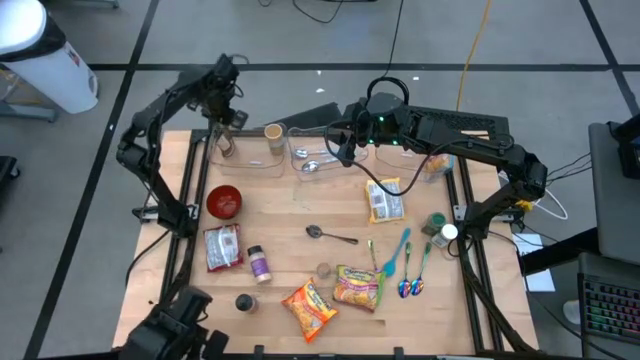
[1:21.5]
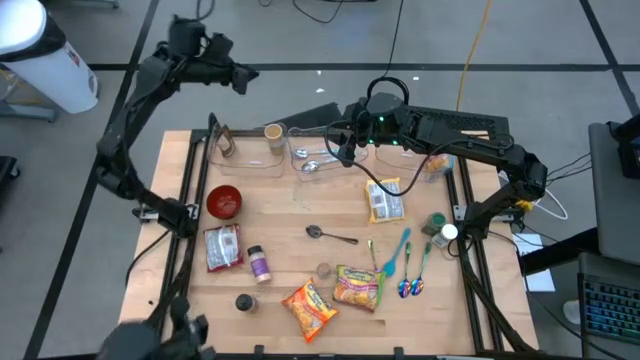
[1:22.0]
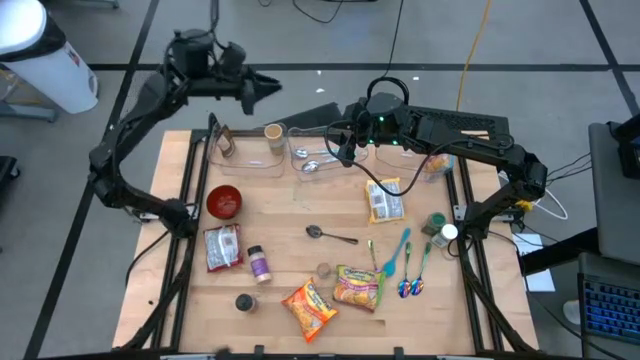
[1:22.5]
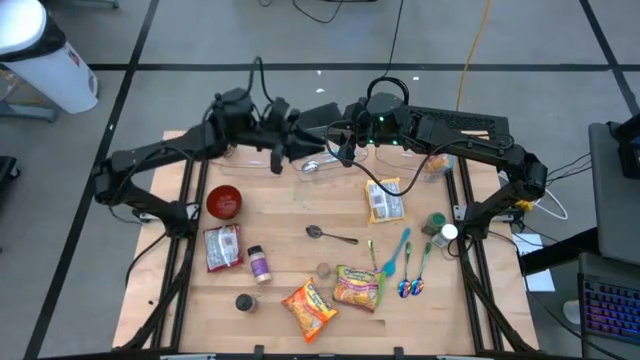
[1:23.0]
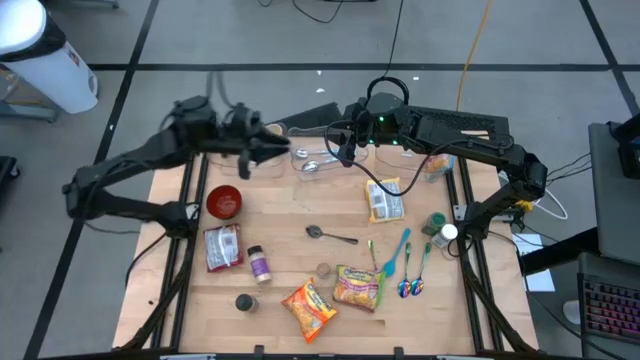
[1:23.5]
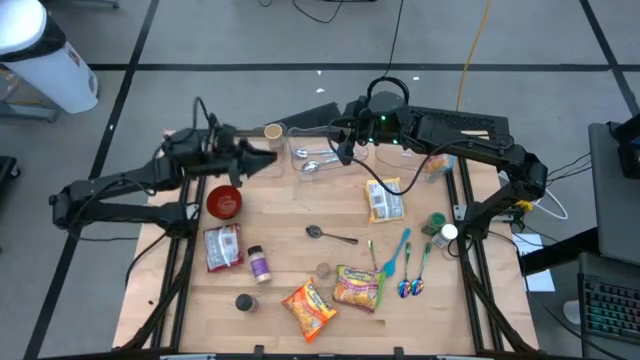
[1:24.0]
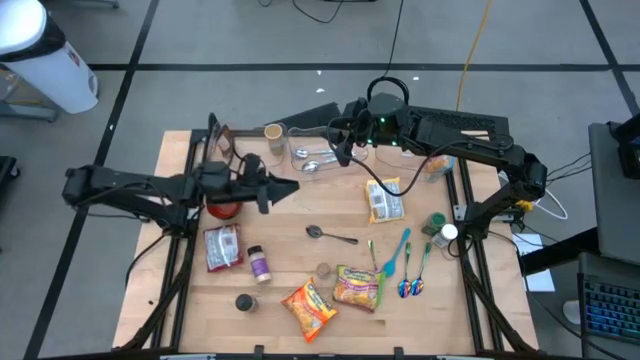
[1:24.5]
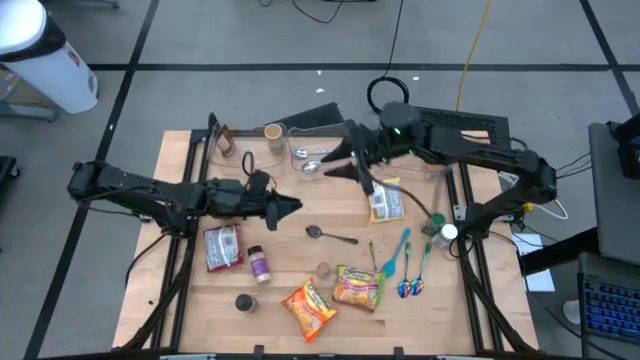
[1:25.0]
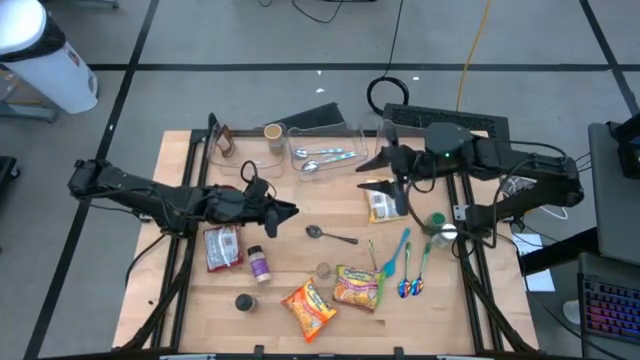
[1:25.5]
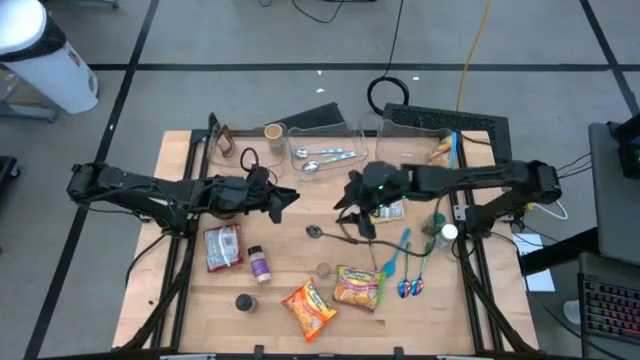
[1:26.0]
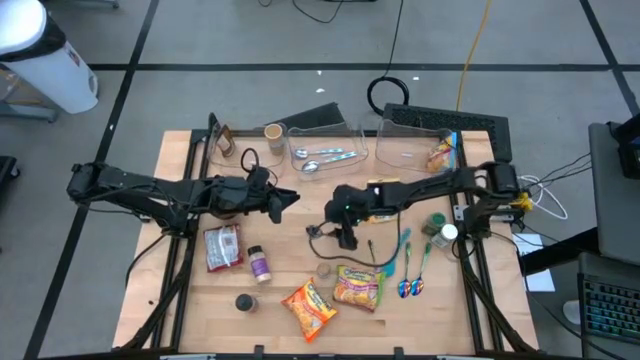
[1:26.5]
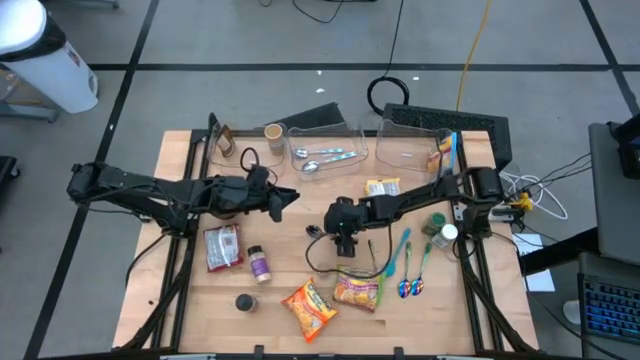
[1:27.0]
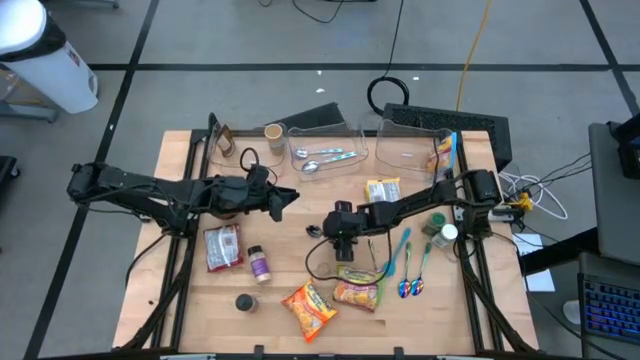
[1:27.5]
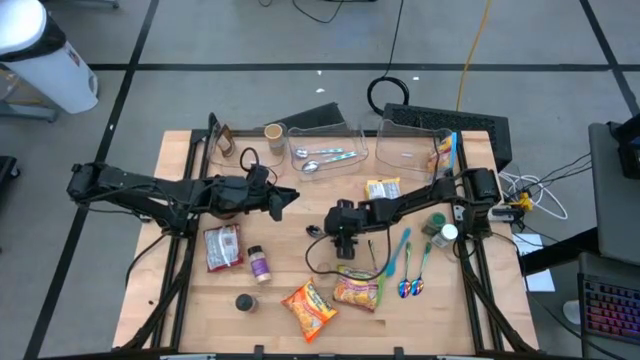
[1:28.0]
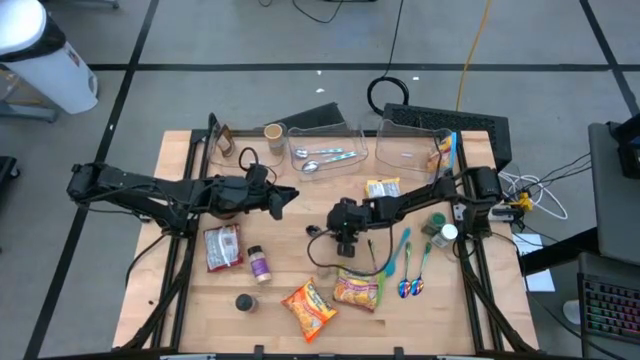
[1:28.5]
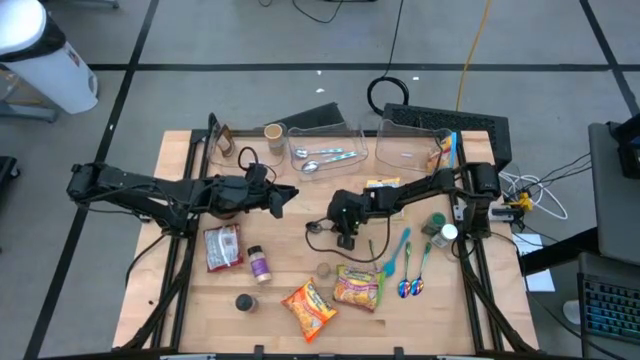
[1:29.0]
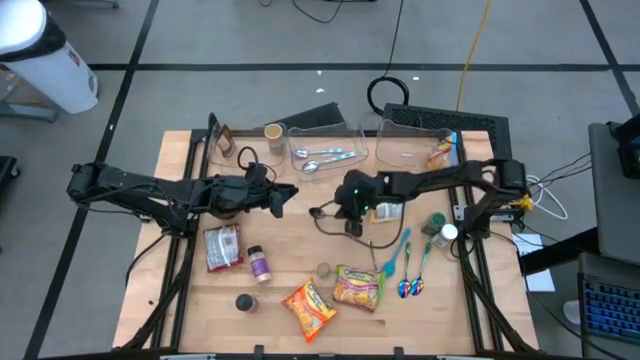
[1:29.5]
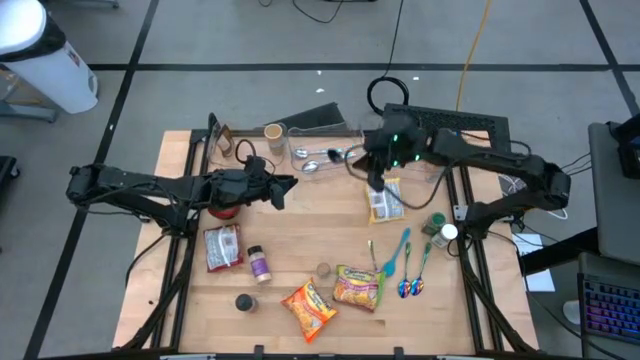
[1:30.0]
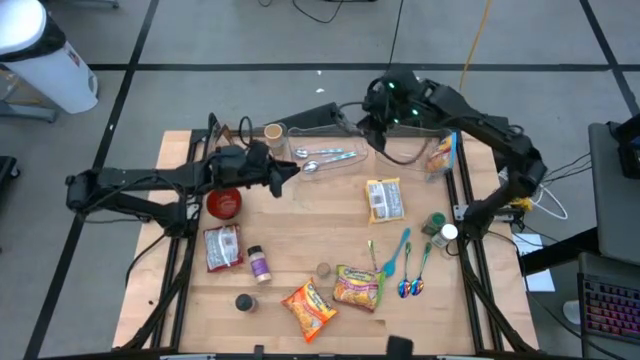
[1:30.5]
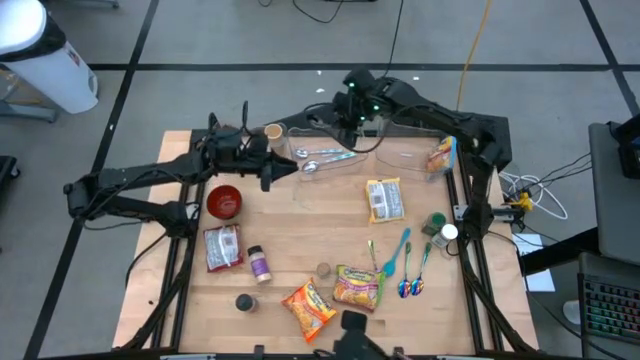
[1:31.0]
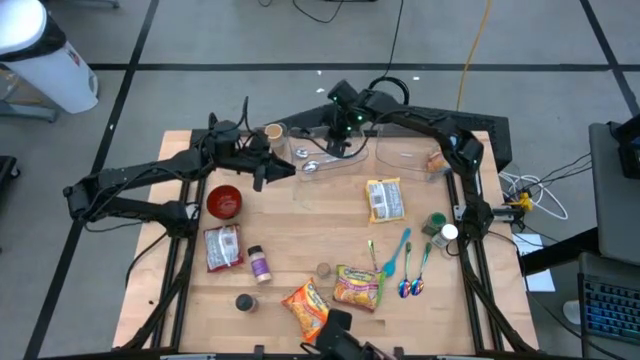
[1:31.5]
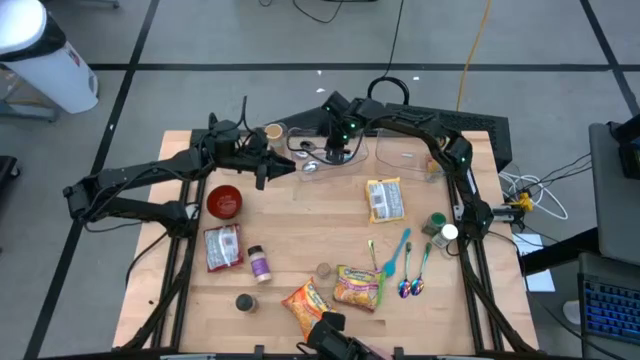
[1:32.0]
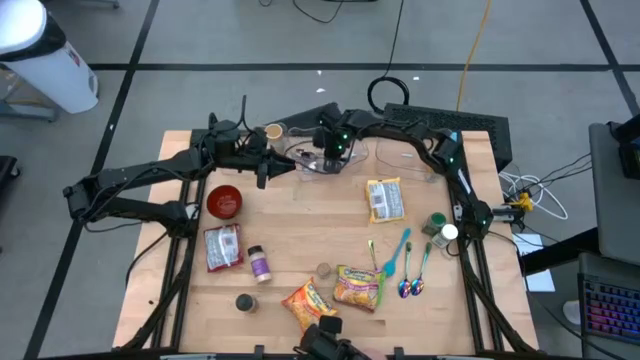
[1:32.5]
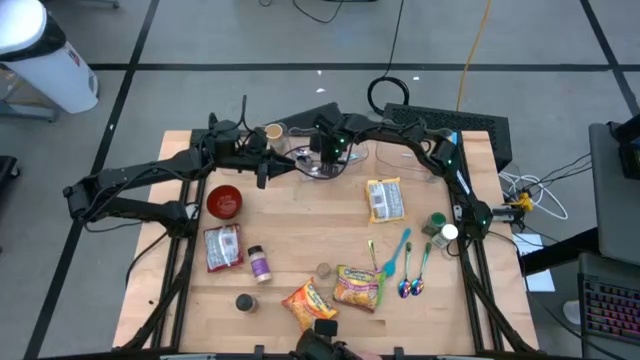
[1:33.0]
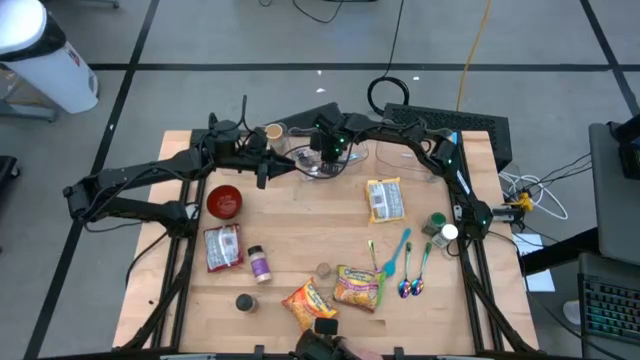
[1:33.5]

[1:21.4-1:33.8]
Task: Pick & Place Food Item
Put the black spoon into the middle transparent bin

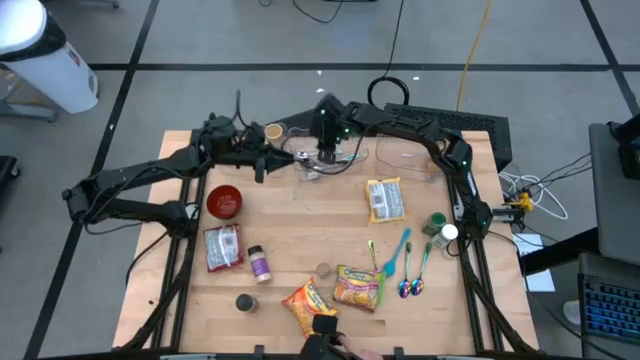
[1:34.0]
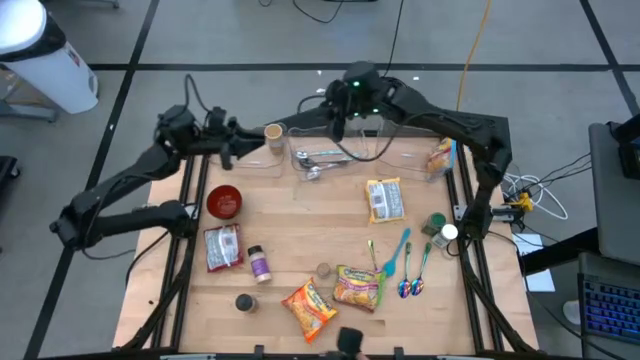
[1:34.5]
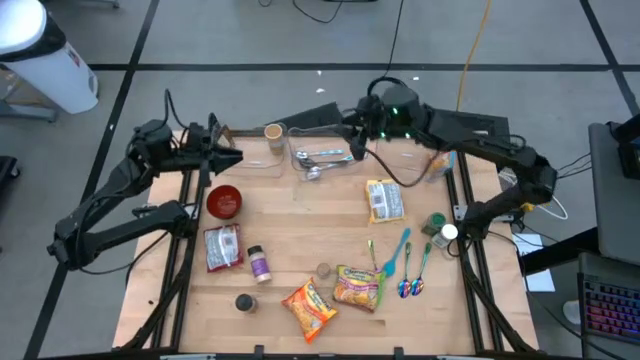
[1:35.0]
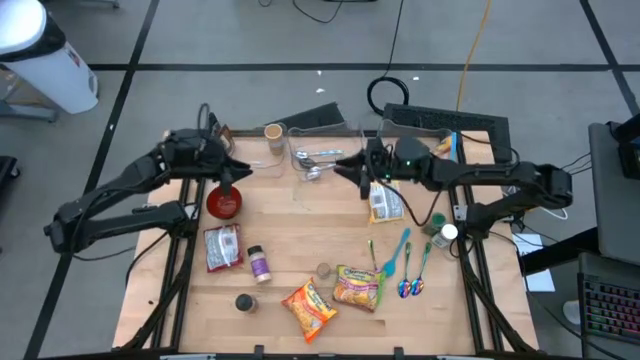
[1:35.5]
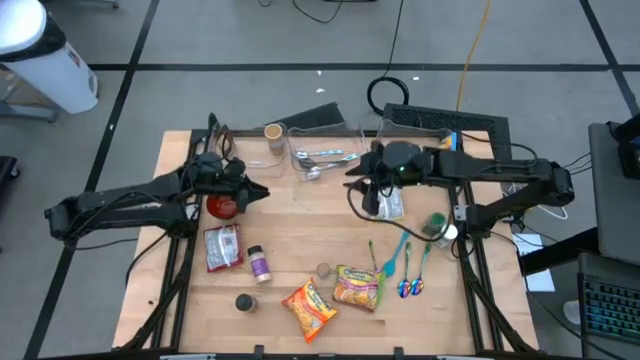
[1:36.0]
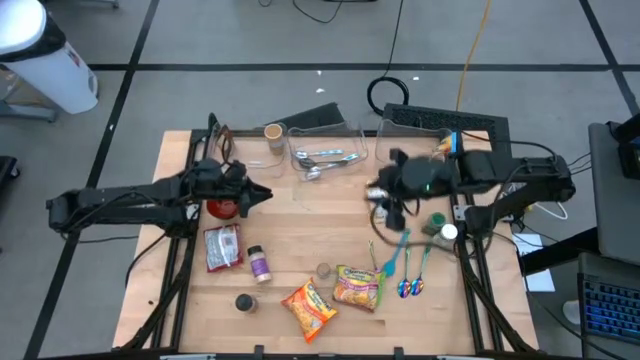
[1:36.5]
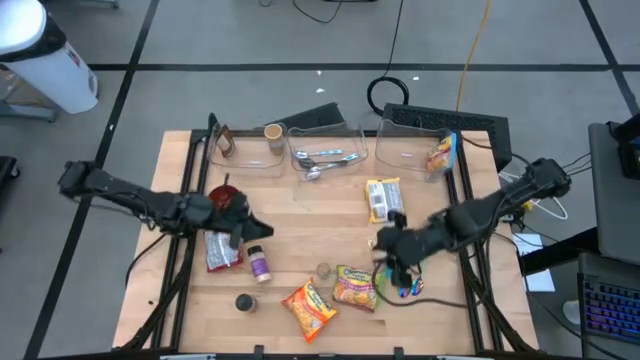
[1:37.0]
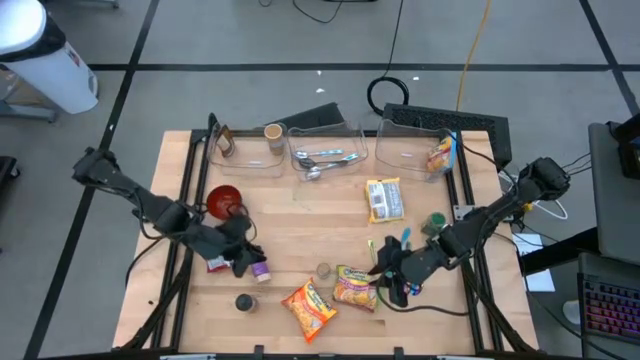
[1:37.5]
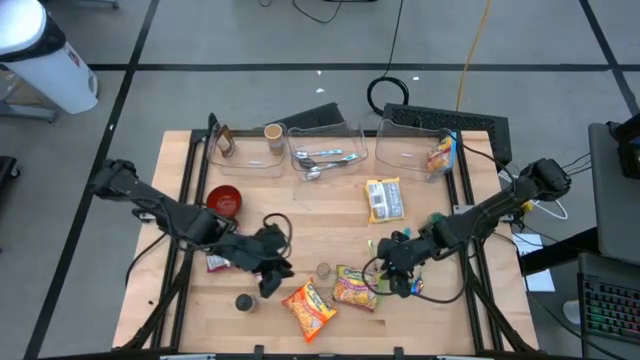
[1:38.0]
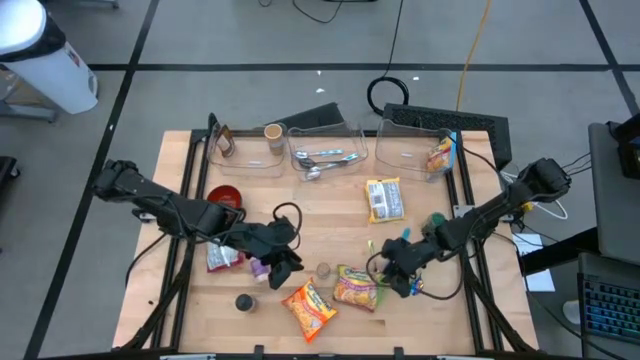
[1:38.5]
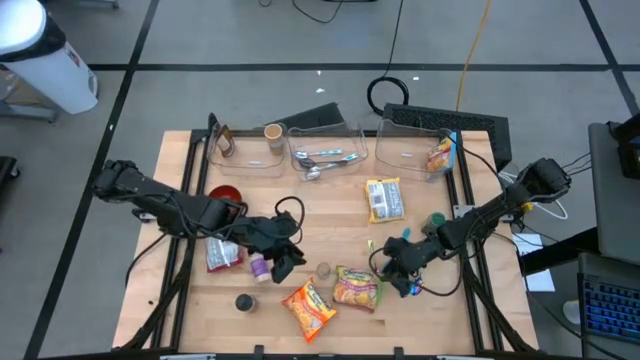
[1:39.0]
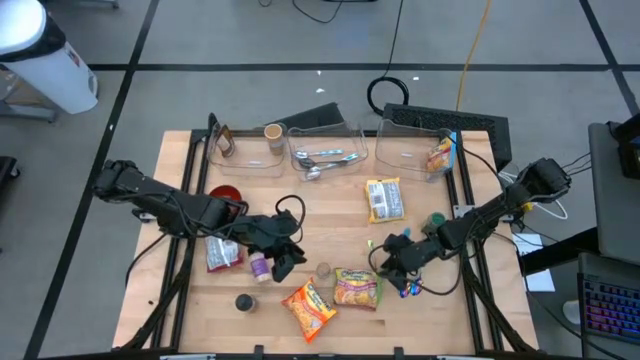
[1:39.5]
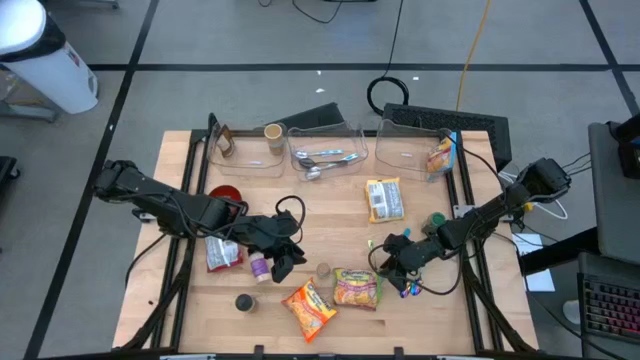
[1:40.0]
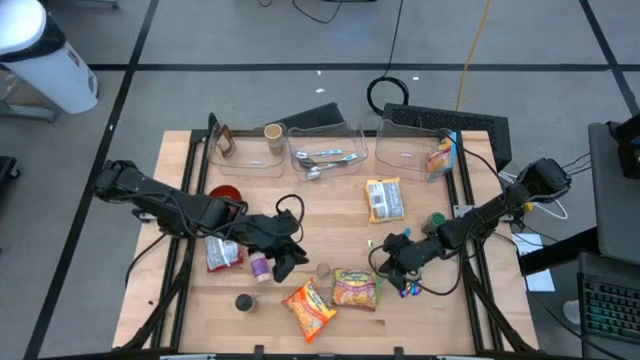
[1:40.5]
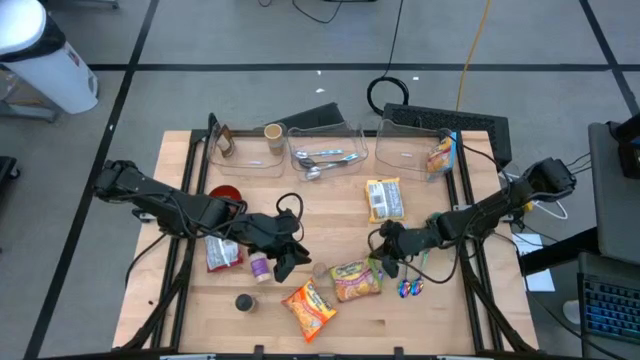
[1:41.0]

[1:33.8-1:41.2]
Put the green noodle pack into the right transparent bin
